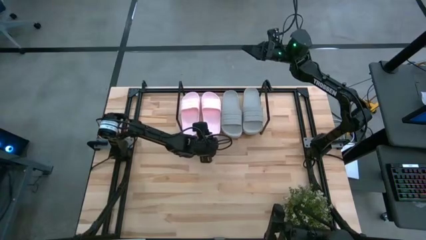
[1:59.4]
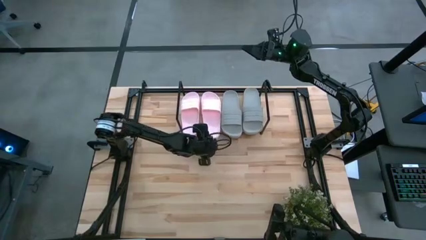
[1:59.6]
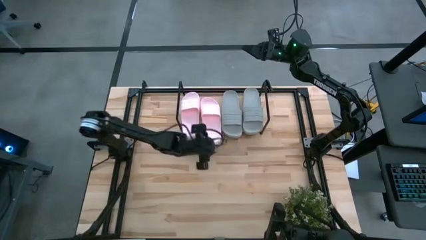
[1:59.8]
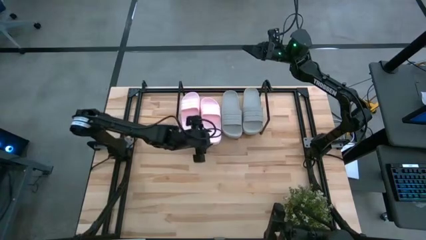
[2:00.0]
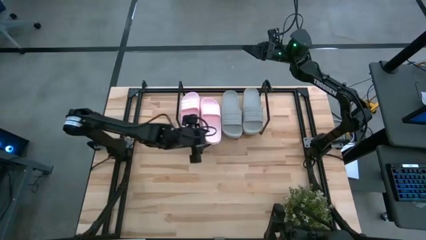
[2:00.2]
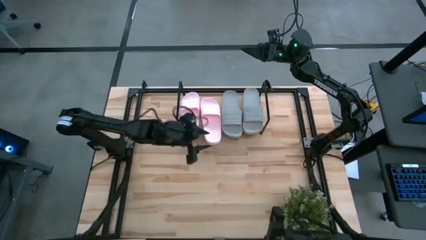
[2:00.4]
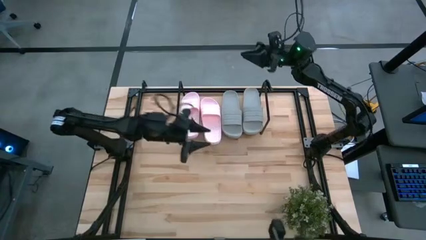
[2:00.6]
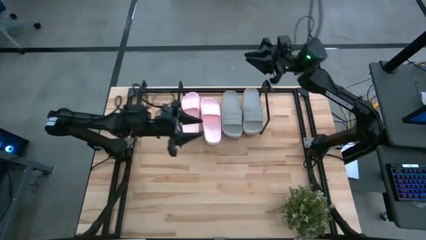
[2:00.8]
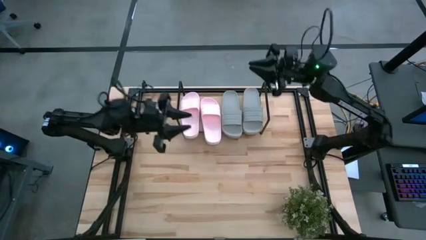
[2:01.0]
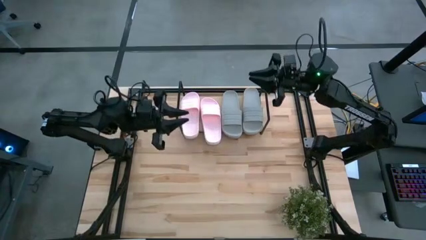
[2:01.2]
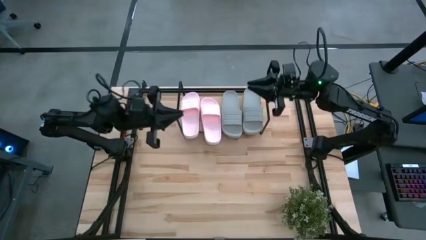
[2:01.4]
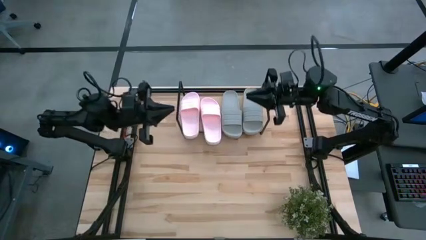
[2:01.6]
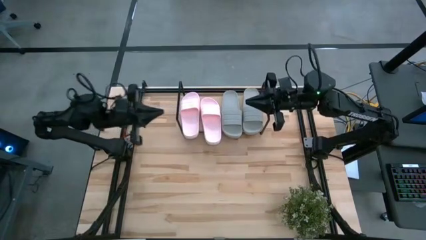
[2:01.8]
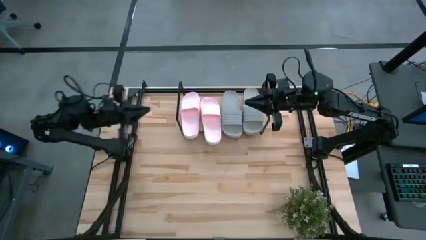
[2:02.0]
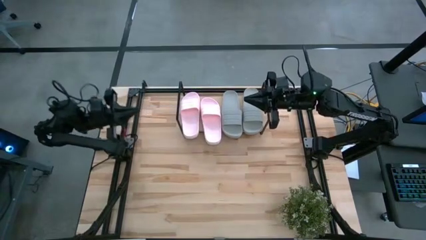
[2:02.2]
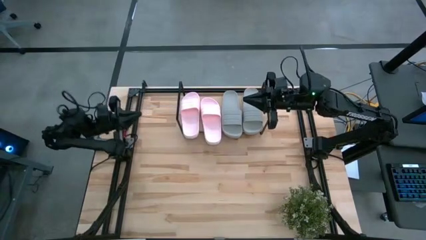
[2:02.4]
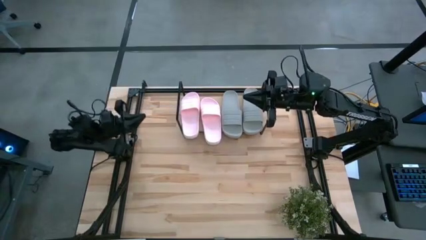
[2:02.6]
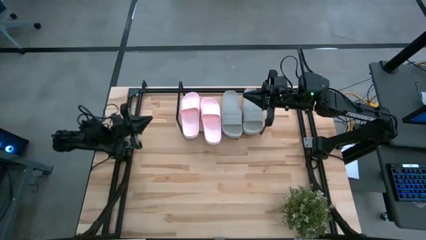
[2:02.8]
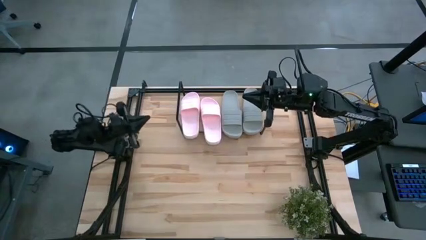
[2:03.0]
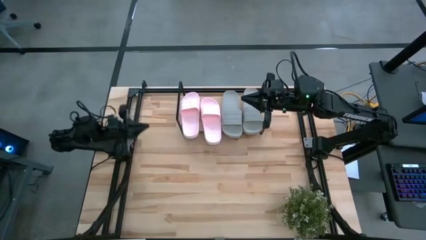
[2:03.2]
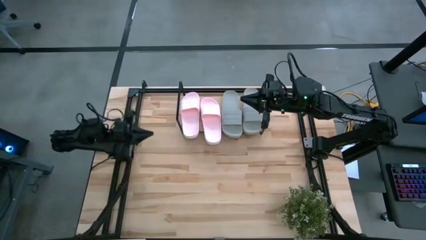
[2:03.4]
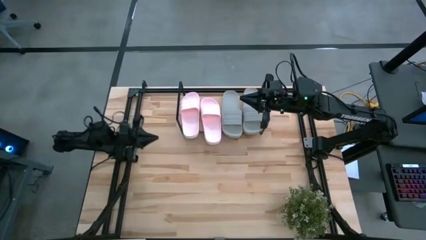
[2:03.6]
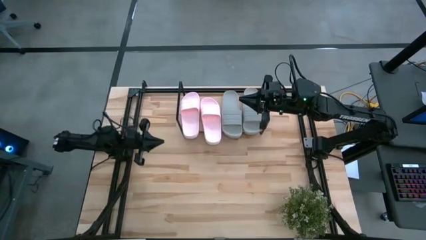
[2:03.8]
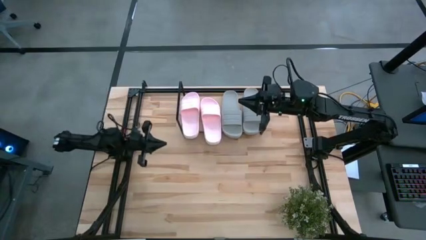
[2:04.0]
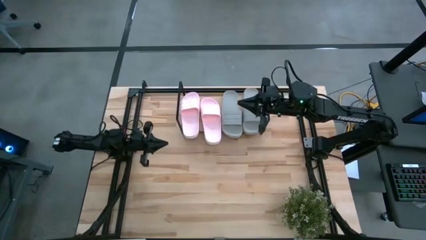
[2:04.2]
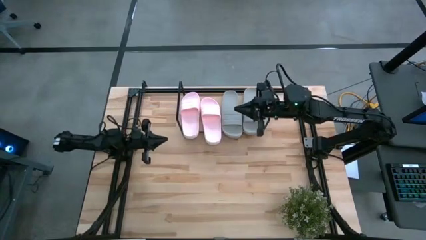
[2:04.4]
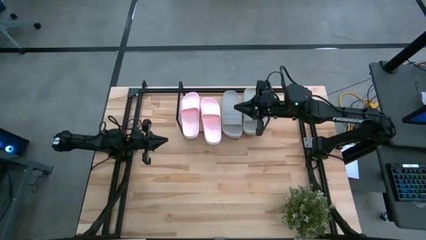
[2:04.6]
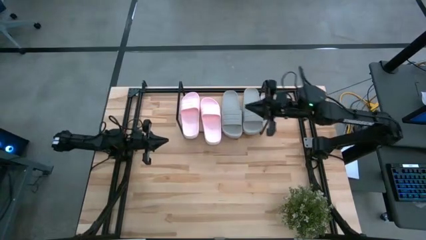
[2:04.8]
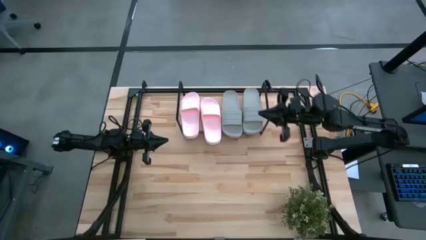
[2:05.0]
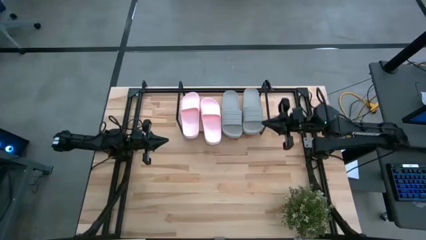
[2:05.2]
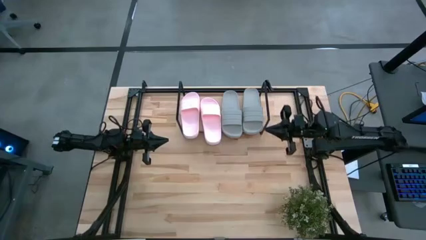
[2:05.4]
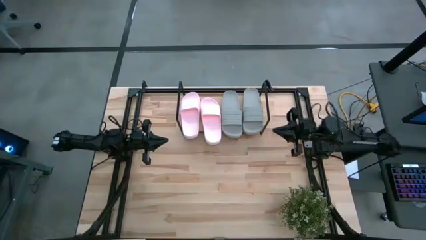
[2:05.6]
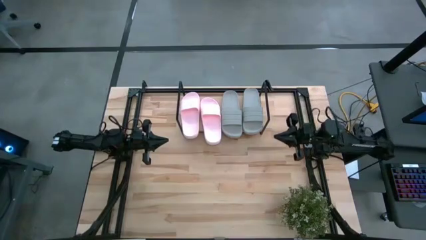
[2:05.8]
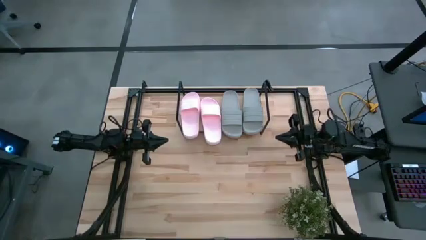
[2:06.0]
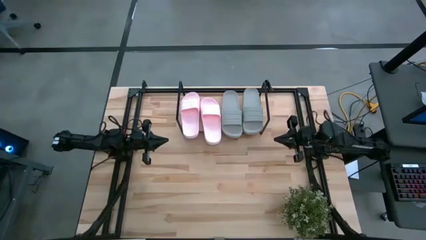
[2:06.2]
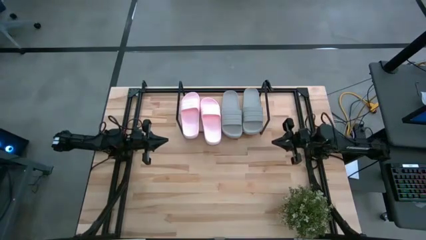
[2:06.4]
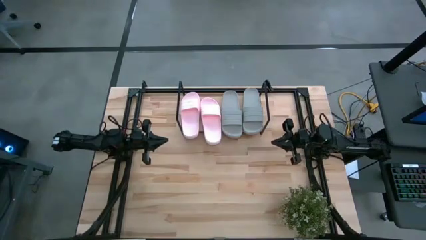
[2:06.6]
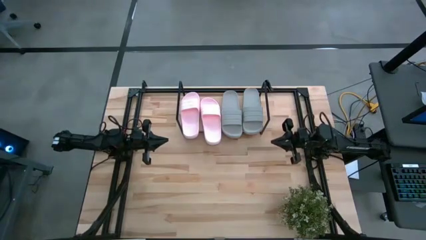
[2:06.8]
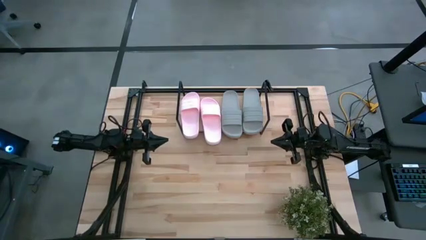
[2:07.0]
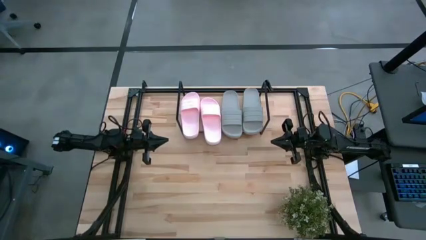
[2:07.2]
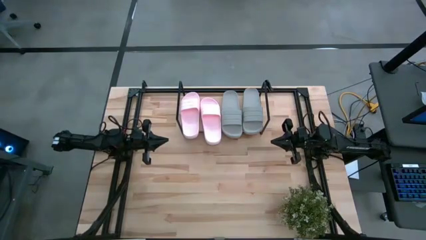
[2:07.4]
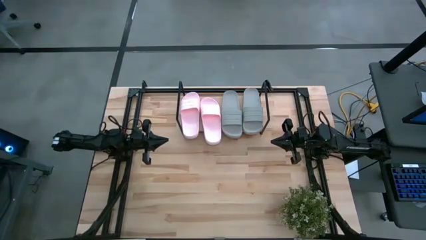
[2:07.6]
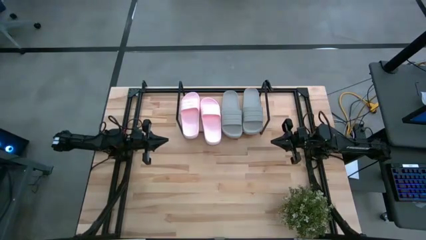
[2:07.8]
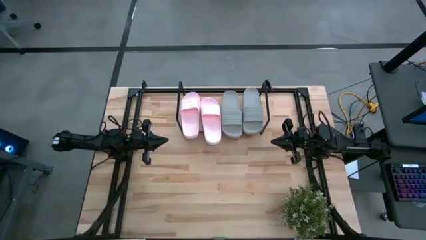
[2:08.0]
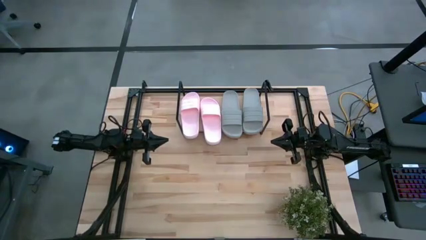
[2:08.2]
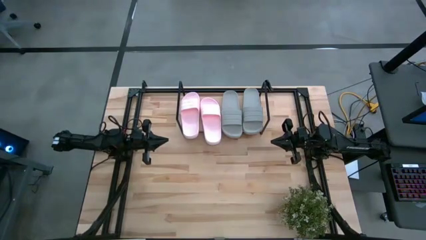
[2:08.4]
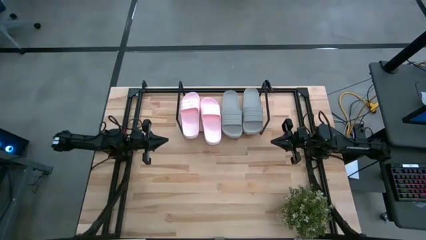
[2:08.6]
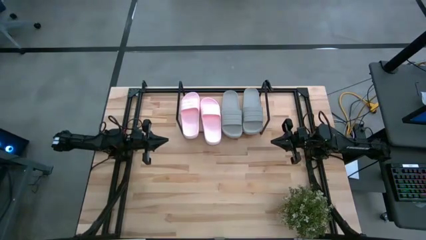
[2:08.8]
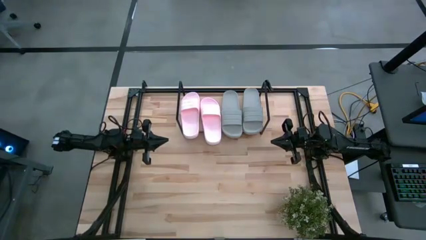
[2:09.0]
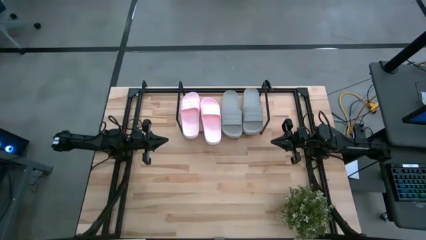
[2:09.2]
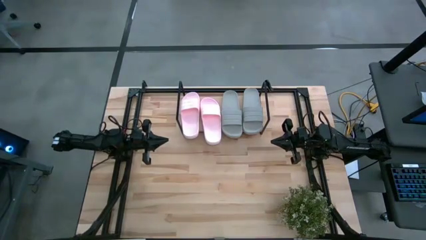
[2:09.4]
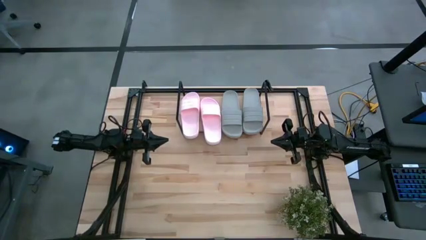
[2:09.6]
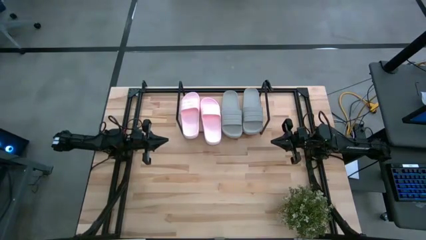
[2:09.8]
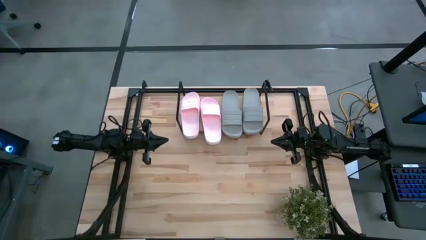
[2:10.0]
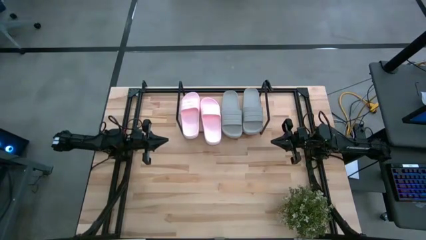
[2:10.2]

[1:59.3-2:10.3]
Task: Pick and place slides into the shelf
Return to Home Position

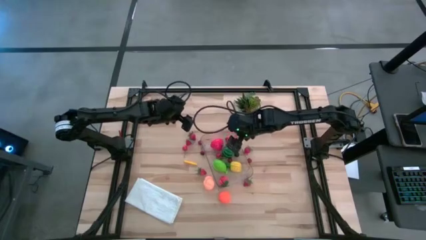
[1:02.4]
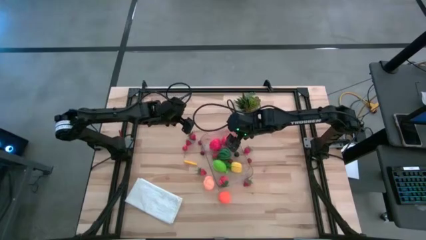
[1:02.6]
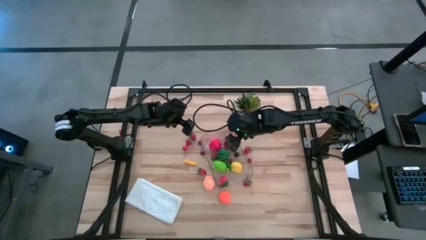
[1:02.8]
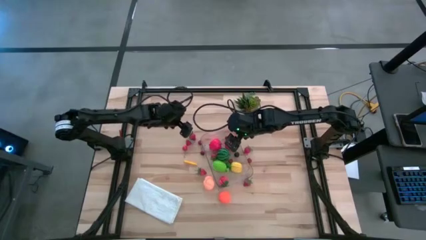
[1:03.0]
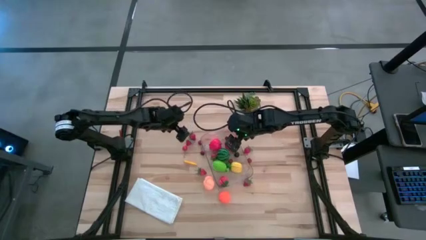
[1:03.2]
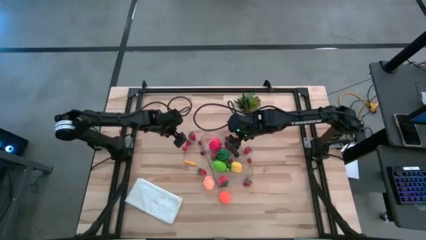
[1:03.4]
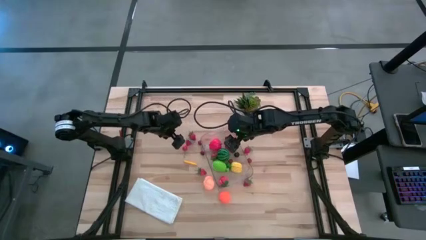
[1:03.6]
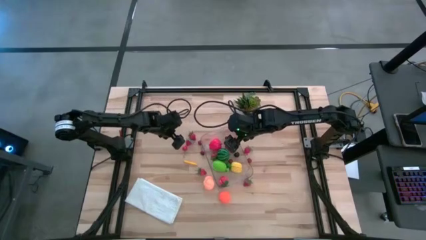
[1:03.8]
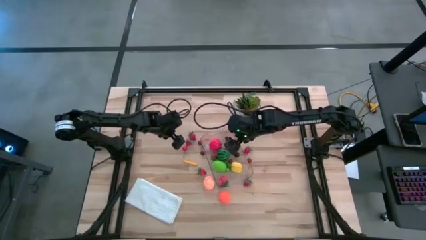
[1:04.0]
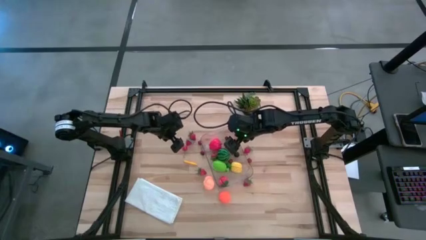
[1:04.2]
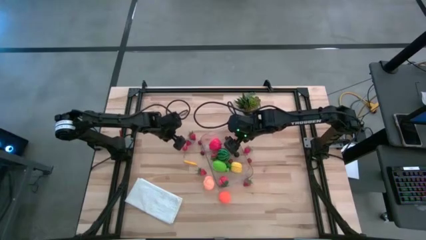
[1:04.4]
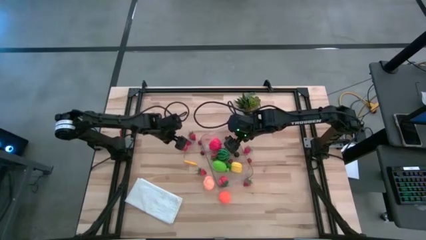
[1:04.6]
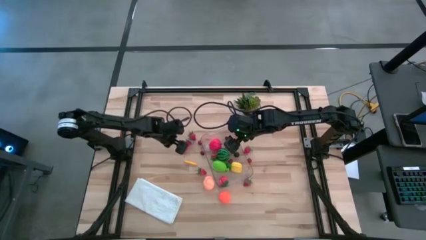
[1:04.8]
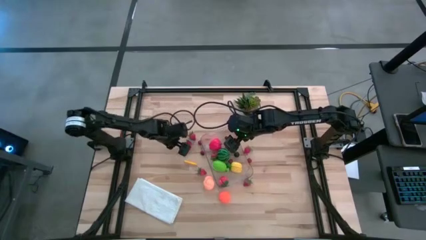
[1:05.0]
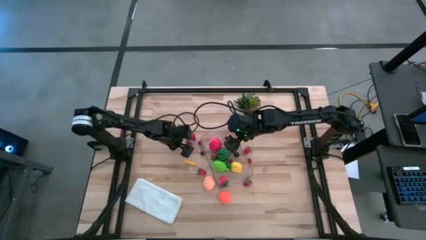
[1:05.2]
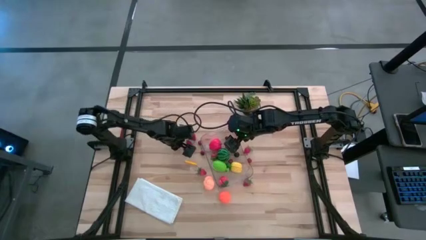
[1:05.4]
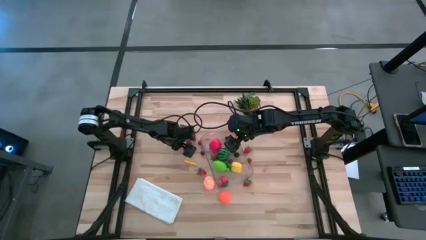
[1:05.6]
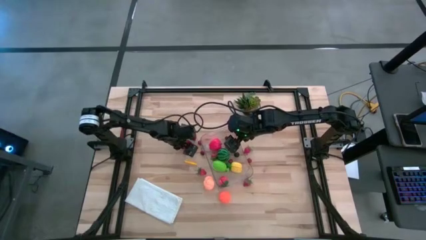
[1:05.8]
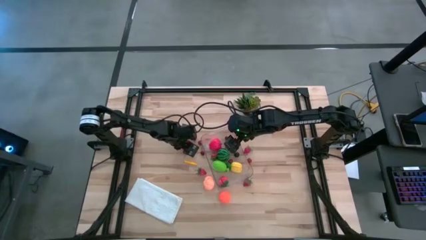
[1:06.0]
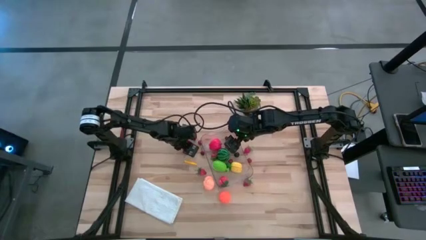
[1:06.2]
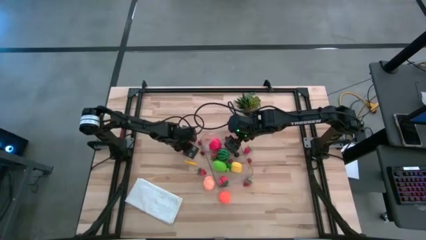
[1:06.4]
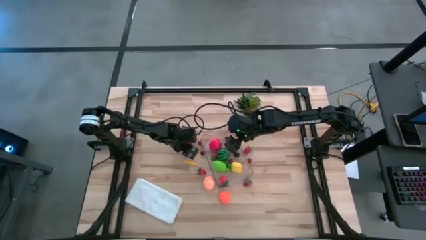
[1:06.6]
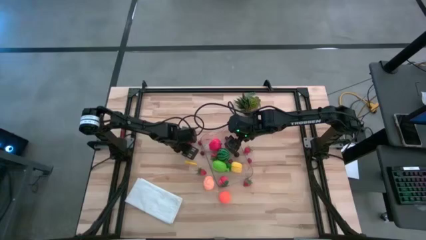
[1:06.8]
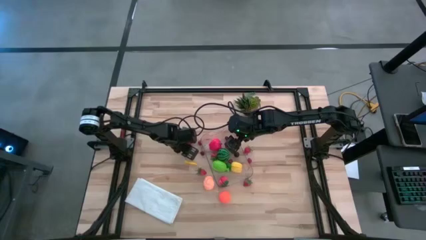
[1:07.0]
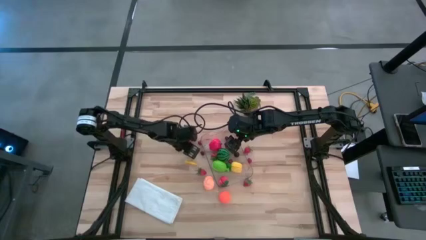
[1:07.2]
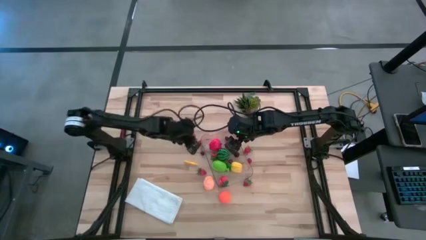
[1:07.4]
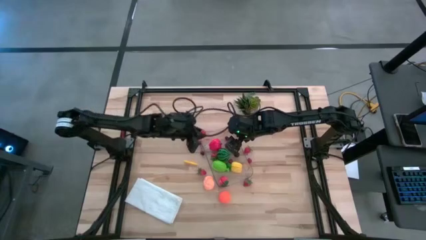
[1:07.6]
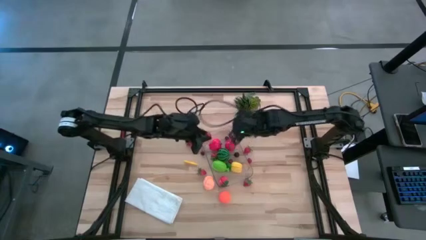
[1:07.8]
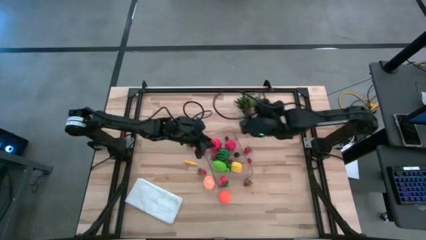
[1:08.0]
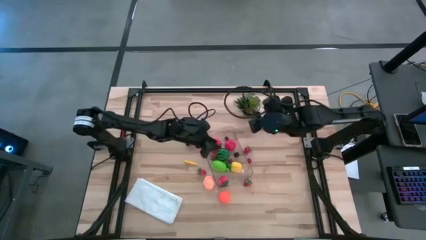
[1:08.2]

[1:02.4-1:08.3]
Task: Pick and placing Produce into tupperware
Put the red cherry into the transparent bin
